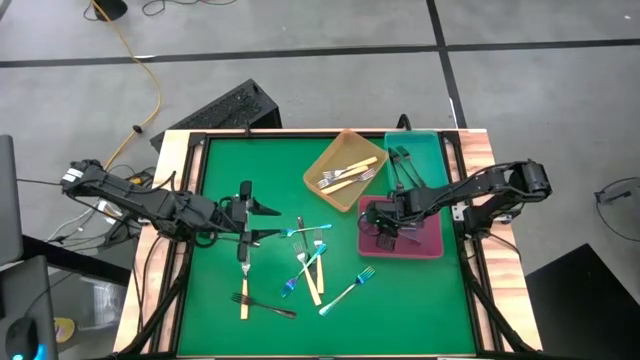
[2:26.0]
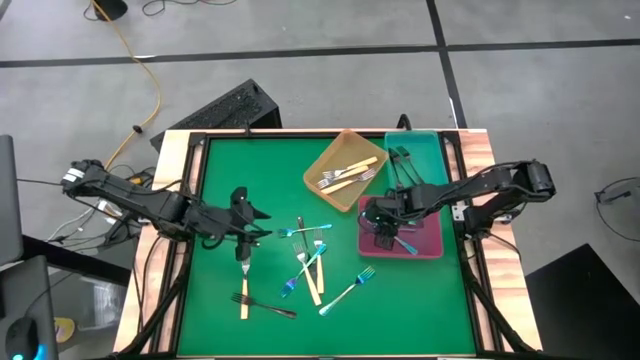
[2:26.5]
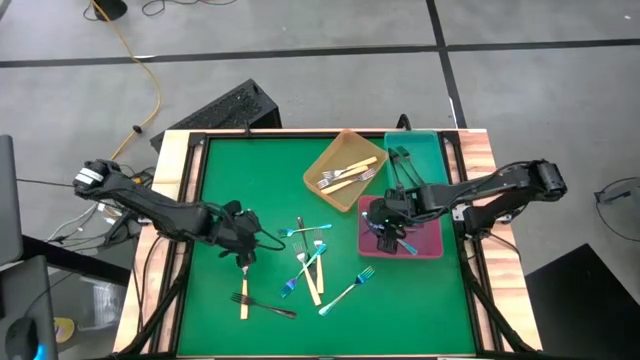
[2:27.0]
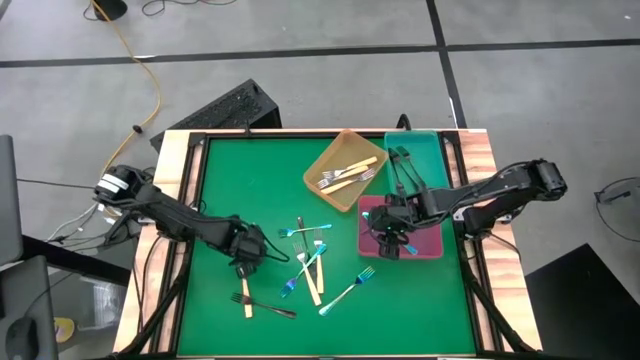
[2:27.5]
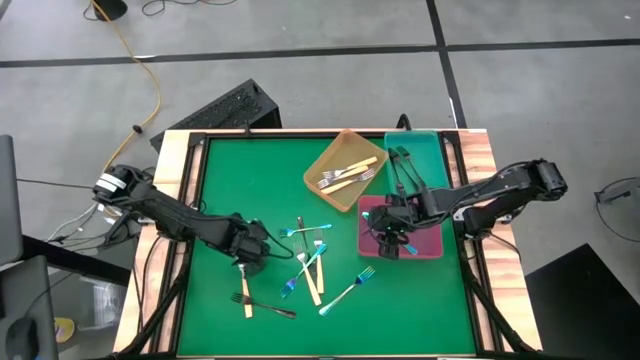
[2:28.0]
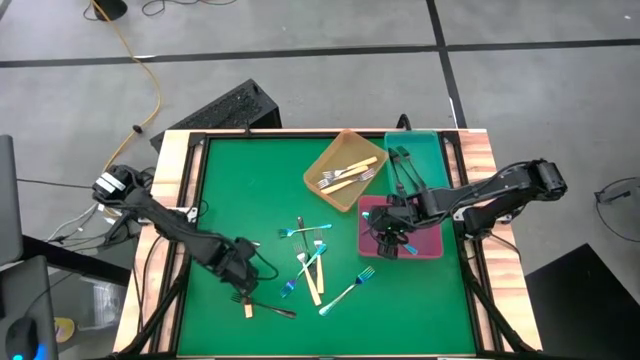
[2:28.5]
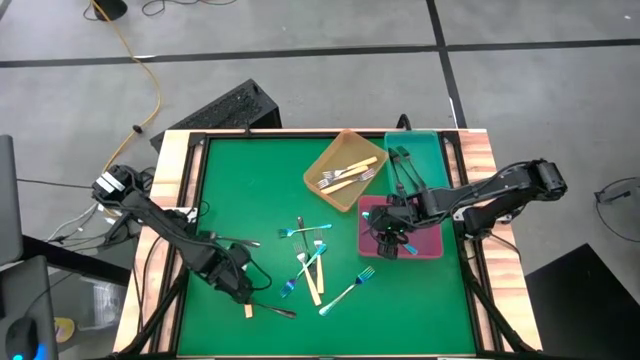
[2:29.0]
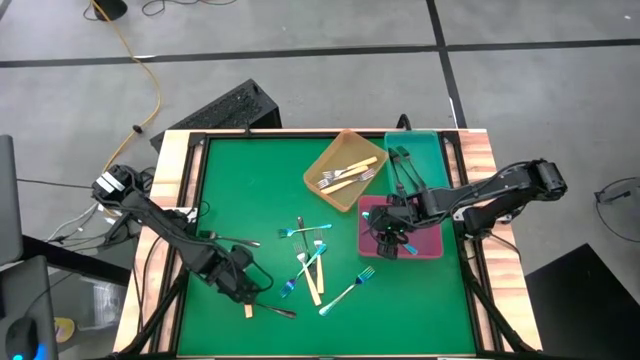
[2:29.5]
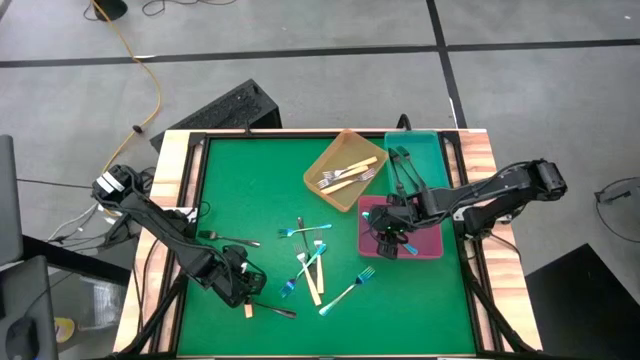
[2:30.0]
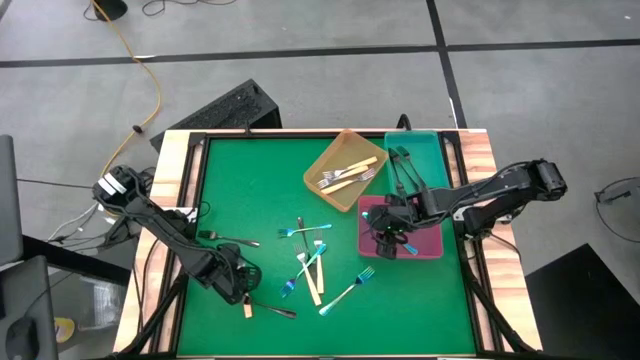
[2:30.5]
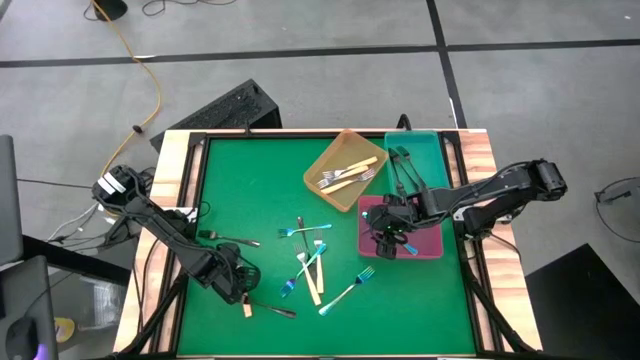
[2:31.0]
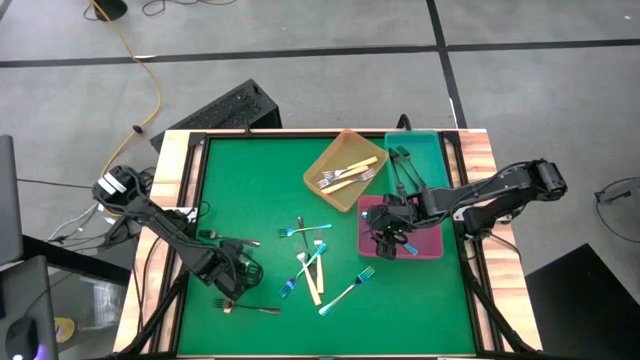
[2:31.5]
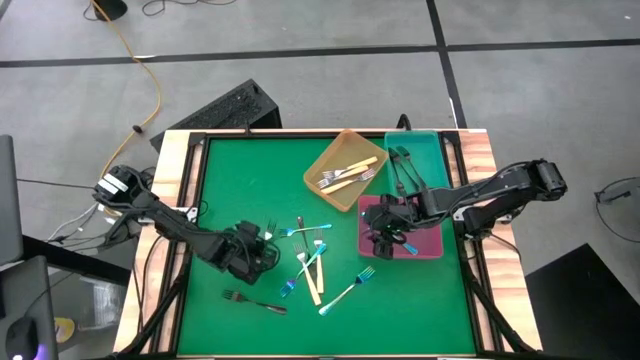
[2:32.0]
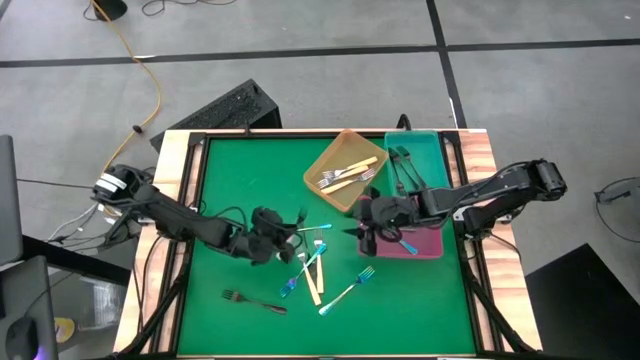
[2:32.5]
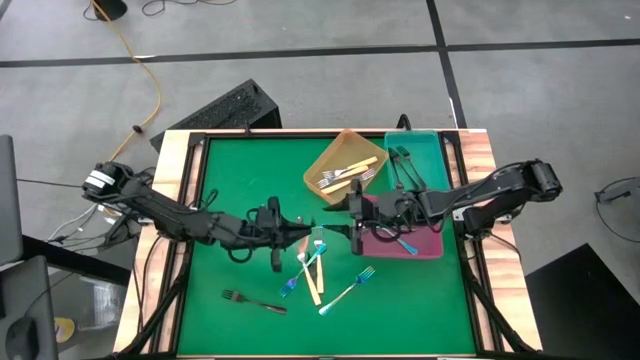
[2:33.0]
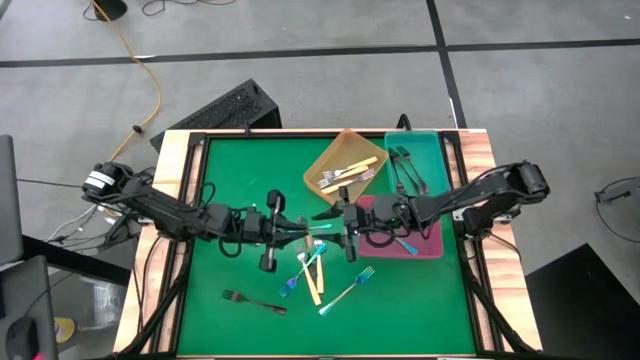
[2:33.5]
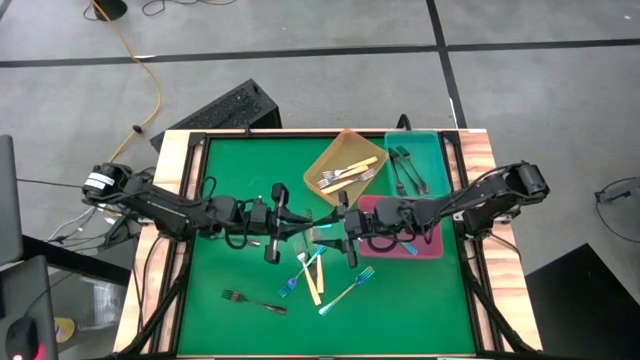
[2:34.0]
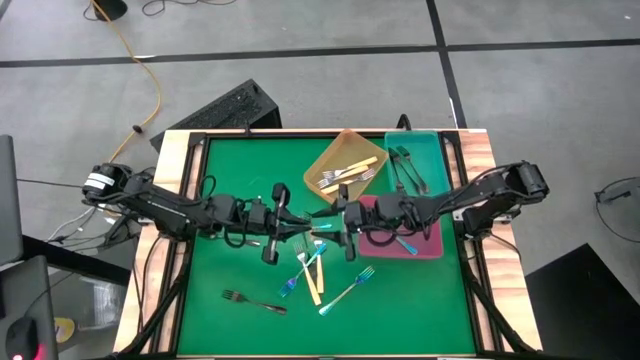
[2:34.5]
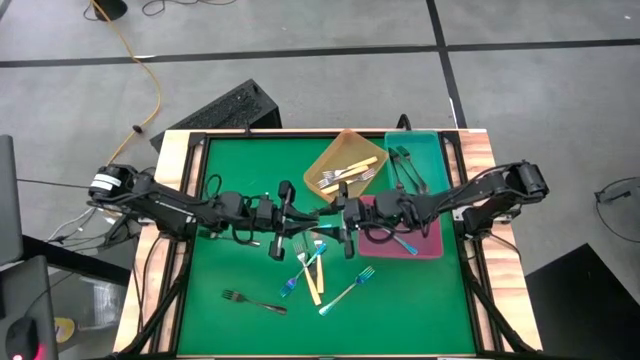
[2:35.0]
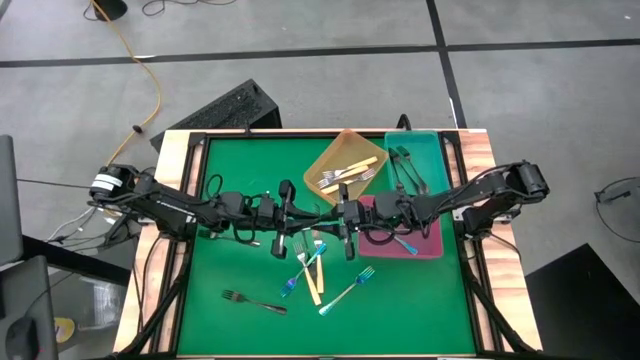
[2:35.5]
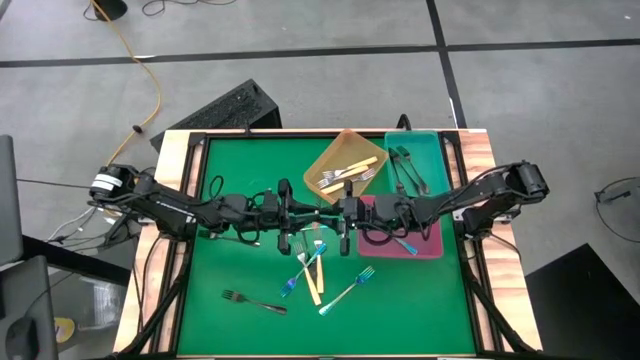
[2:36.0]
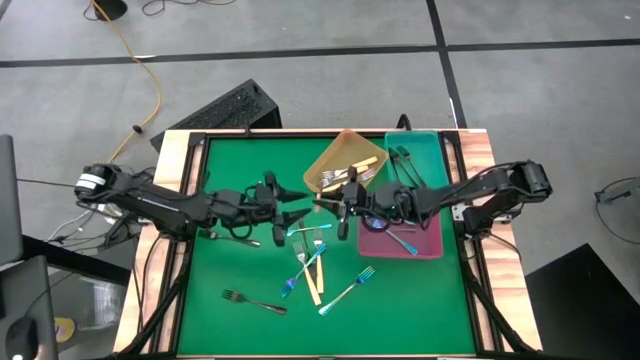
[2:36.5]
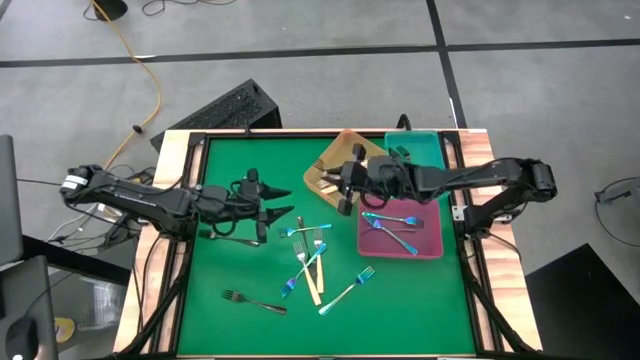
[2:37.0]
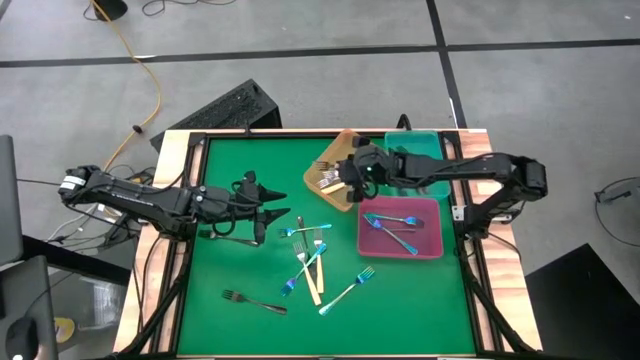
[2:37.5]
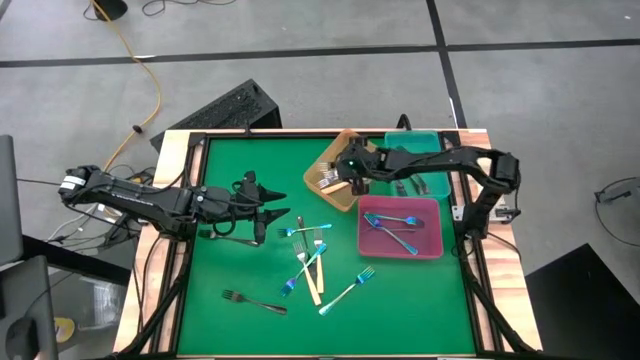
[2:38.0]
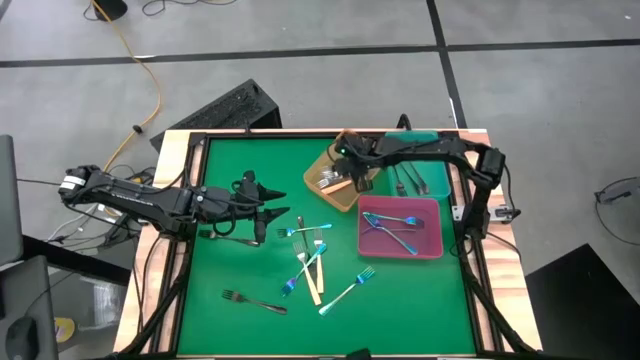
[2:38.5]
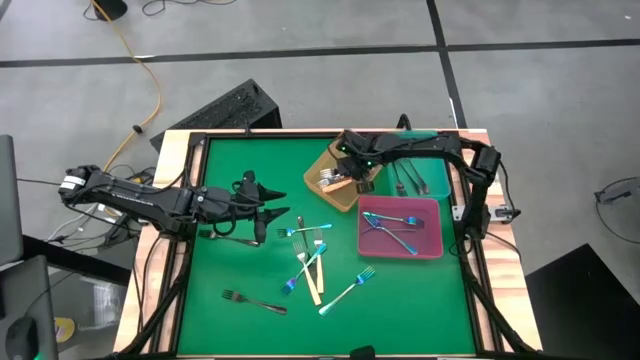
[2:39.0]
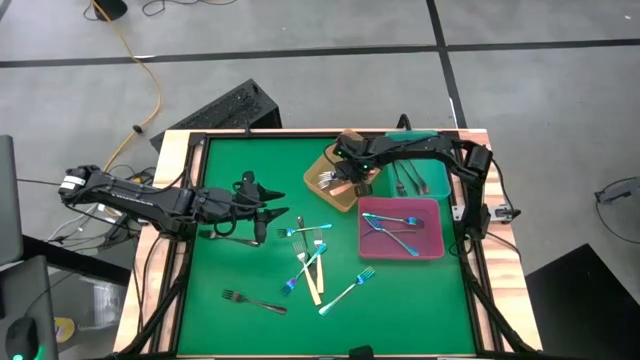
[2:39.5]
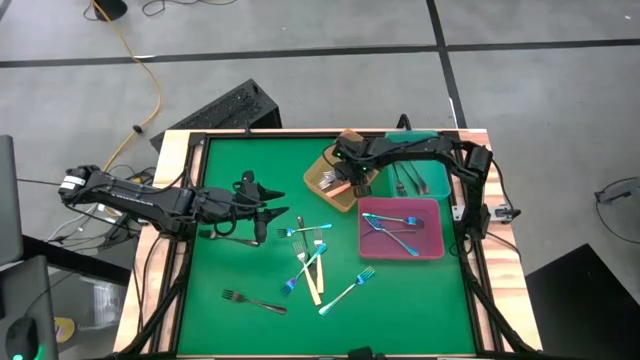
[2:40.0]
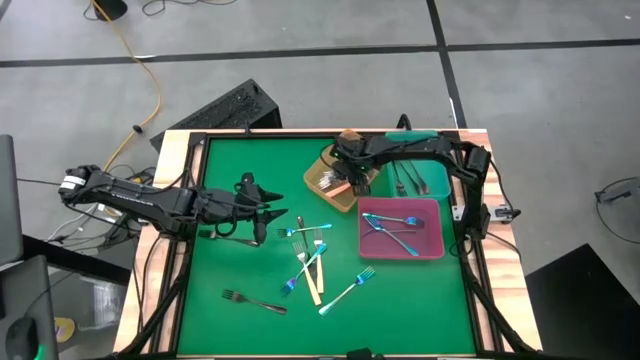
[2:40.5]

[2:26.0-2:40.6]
Task: Sort silverware by color (type)
Put the orange fork into the orange bin

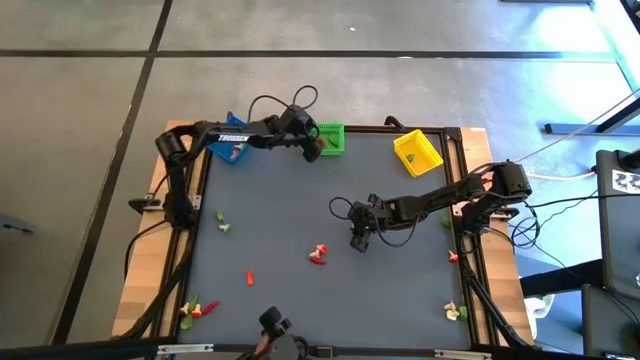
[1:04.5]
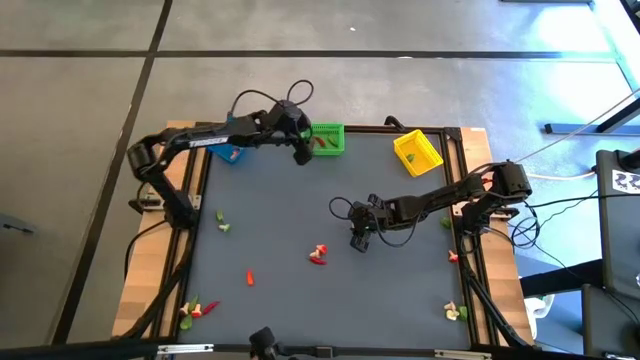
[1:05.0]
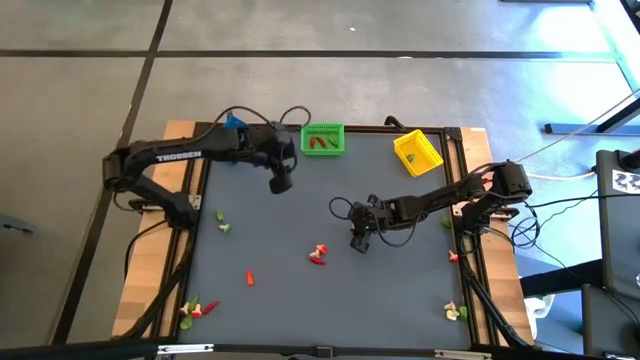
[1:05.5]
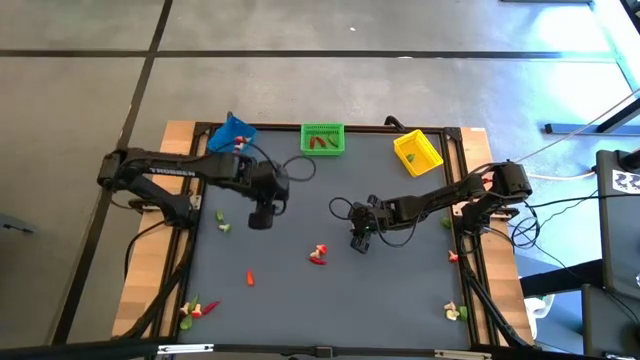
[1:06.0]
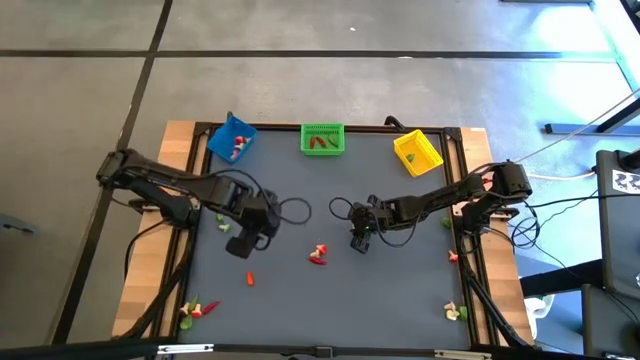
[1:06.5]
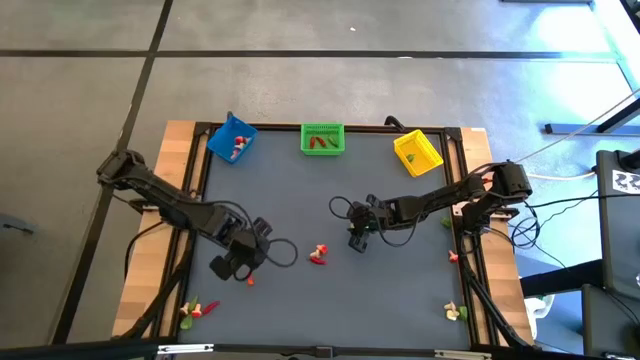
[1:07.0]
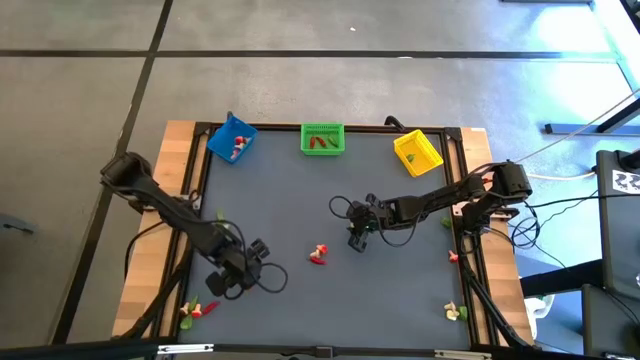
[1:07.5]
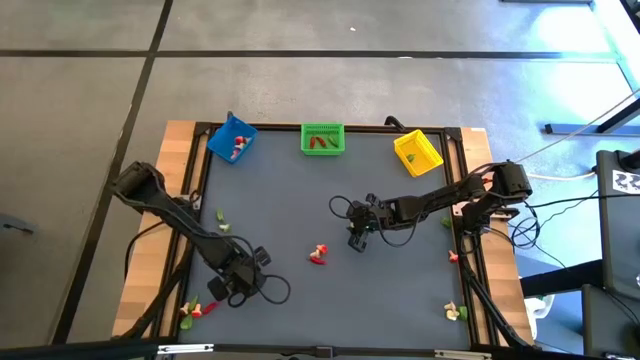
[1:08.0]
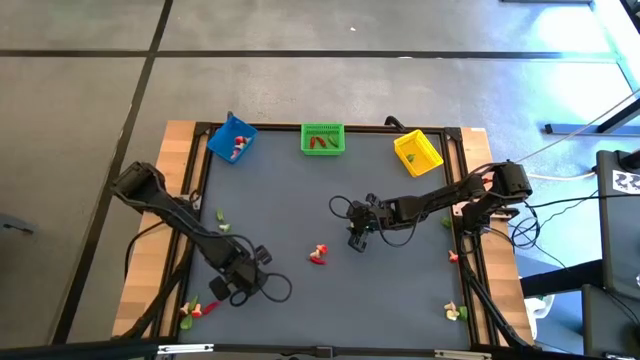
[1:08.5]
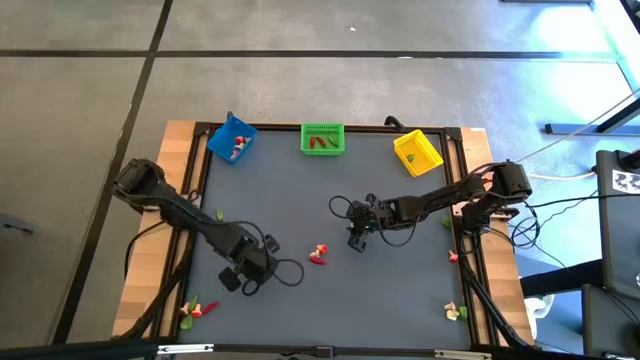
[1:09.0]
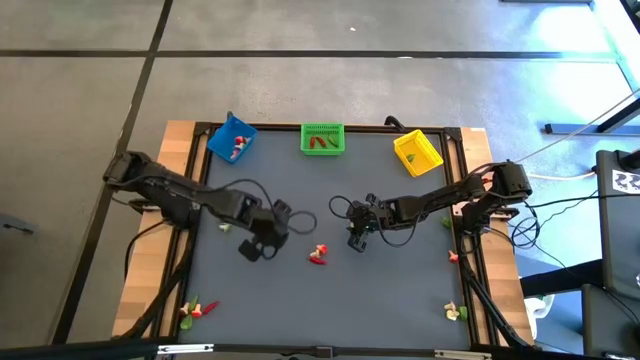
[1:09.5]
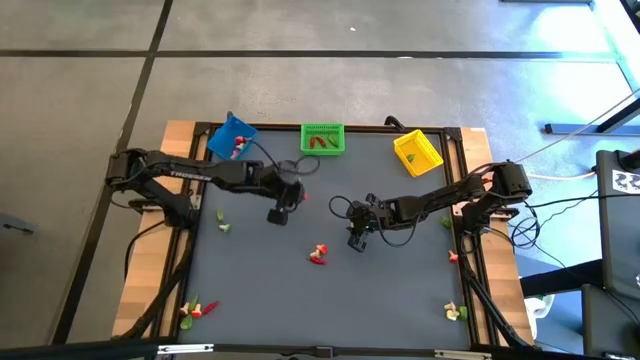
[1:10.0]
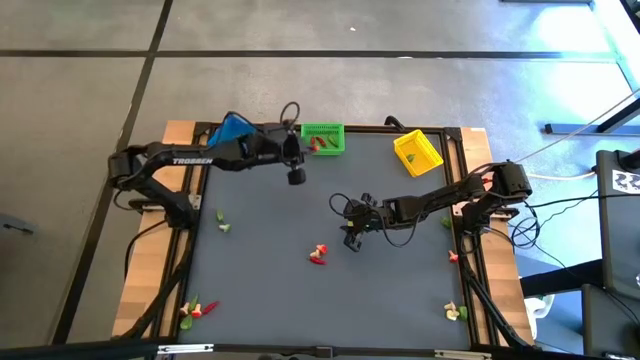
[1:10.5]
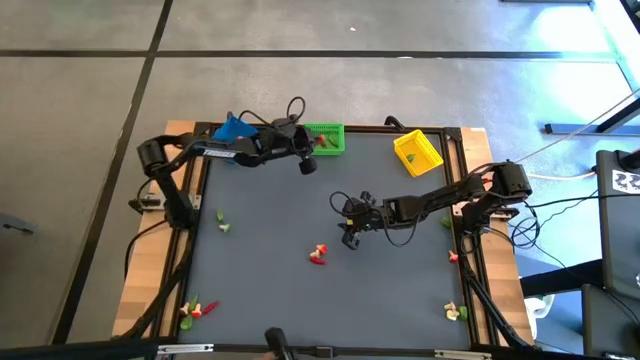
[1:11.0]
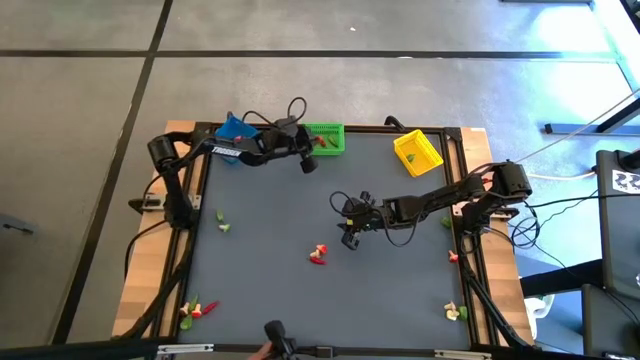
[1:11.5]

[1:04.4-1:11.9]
Task: Sort produce into baskets
Put the orange chili pepper into the green bin
